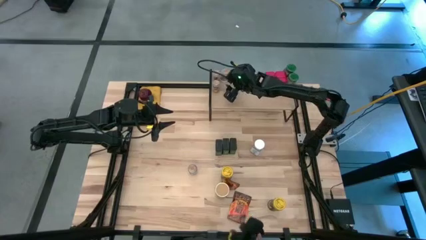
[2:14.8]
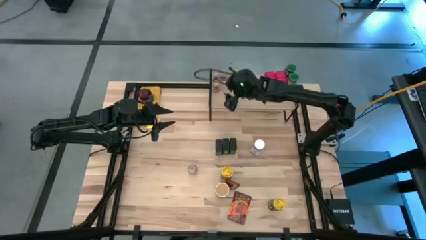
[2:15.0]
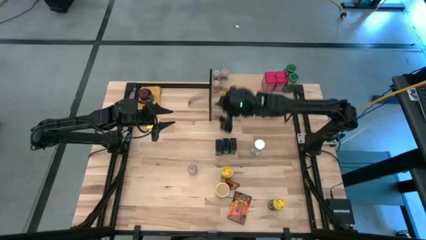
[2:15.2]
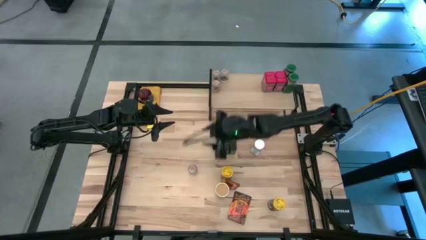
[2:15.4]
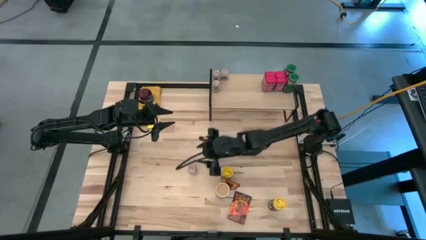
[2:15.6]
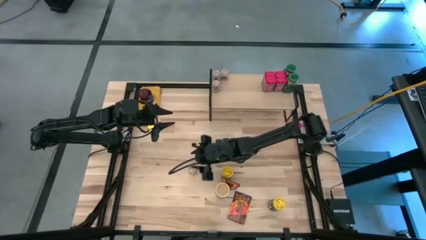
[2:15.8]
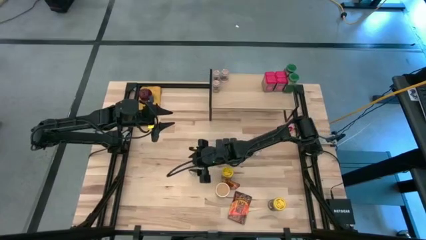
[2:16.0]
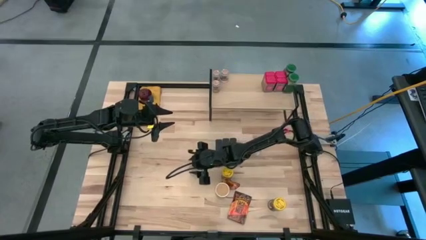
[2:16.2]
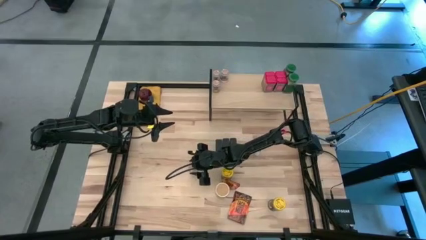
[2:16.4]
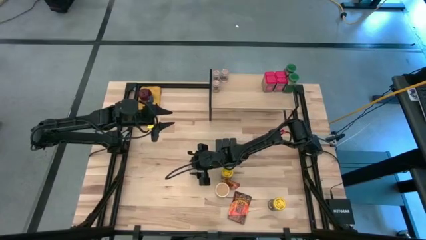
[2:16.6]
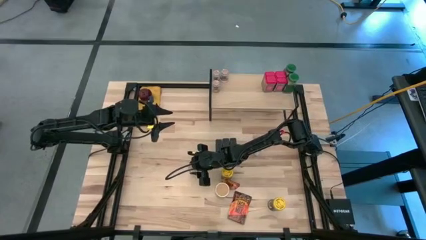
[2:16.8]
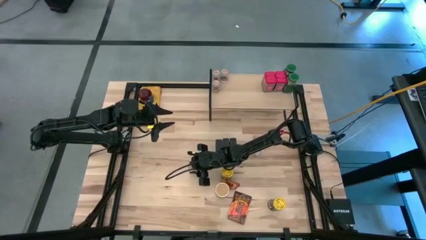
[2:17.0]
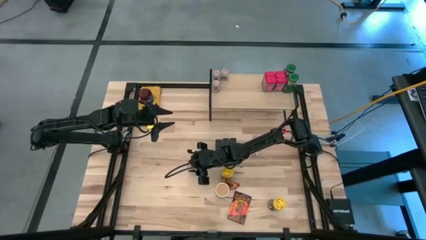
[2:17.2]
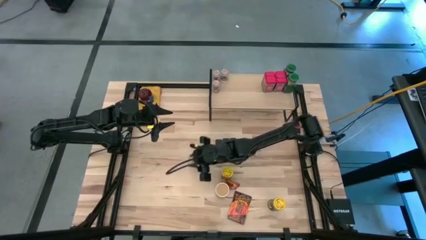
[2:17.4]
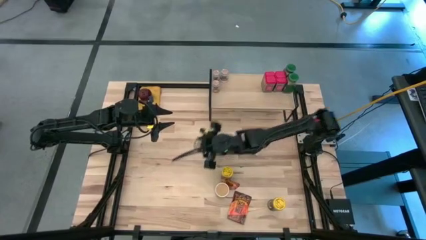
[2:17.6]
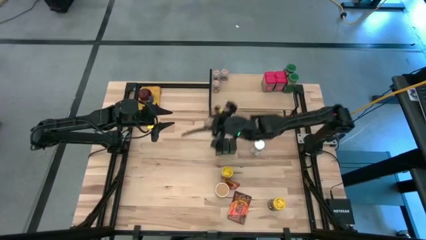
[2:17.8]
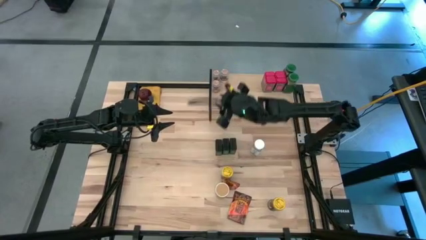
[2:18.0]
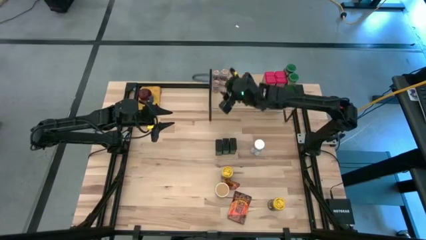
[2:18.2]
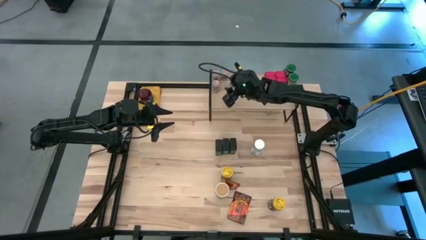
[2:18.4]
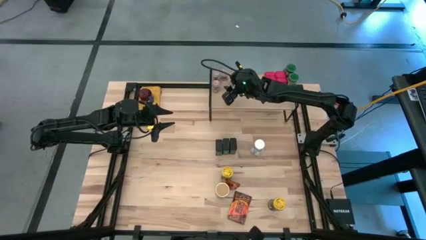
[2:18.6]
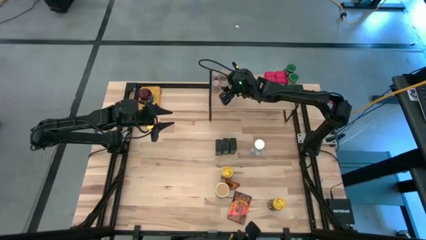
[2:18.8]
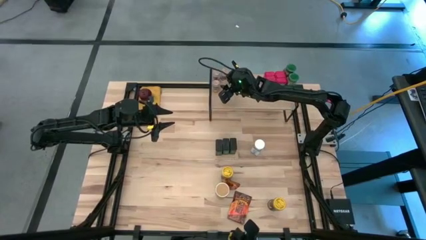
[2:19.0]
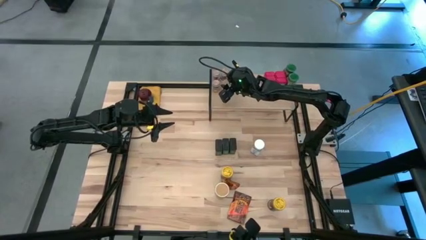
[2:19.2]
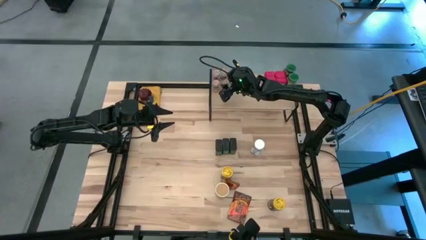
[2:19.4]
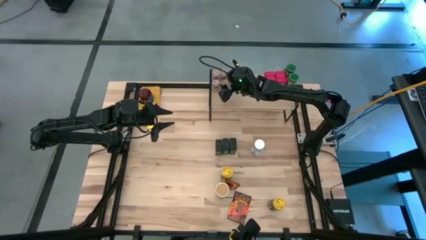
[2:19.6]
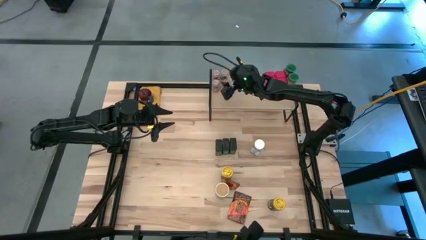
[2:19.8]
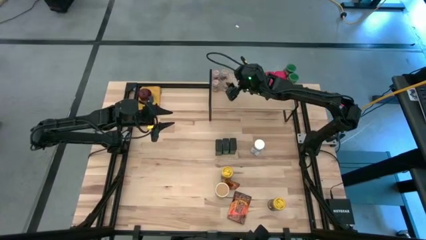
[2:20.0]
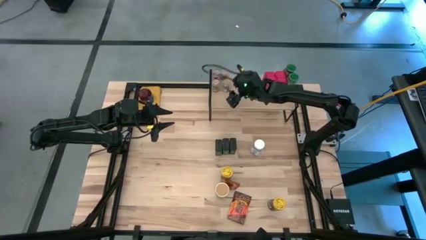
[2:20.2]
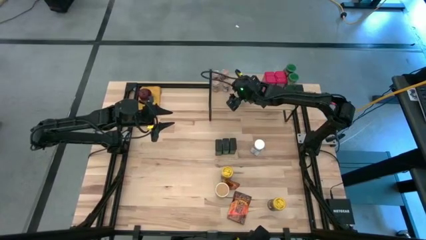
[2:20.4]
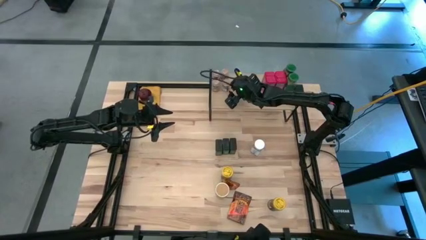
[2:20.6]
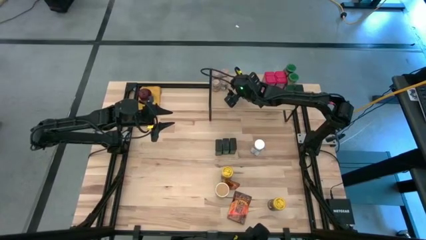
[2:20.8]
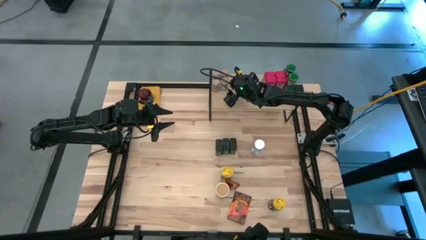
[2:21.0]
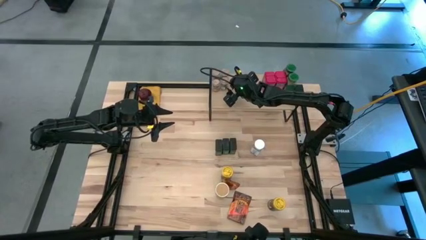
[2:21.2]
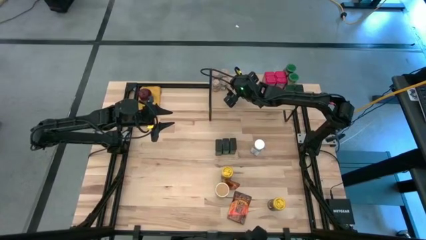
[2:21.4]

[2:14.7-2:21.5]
Task: Shelf spices
Put the brown seasoning bottle on the shelf and align it with the top right brown seasoning bottle

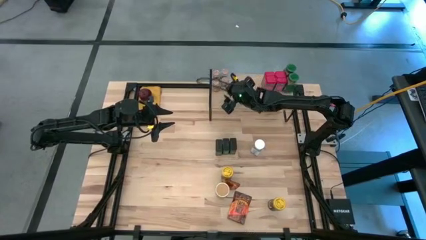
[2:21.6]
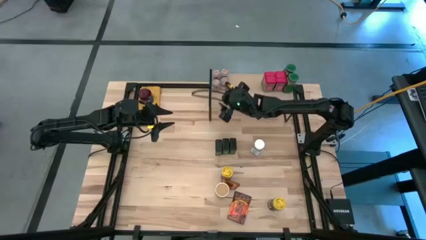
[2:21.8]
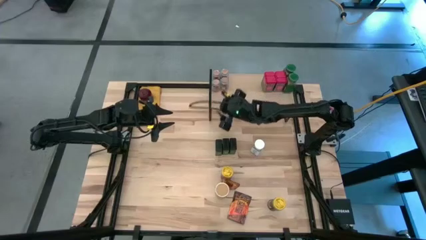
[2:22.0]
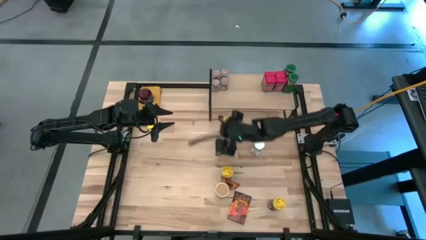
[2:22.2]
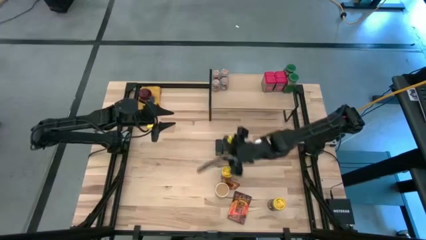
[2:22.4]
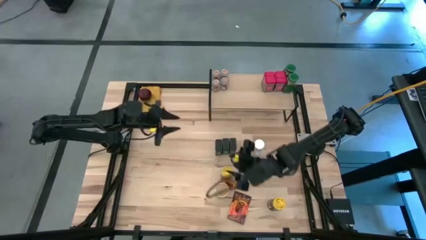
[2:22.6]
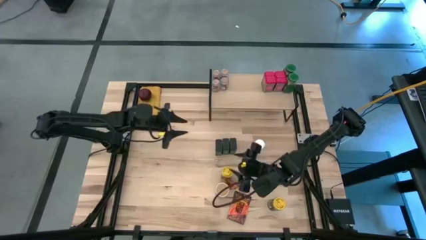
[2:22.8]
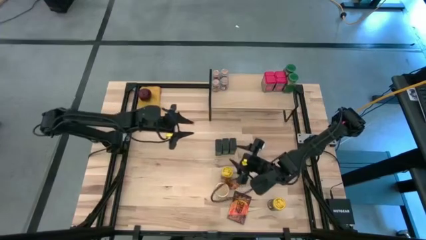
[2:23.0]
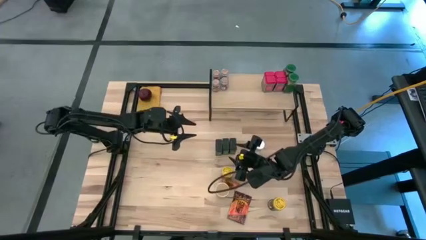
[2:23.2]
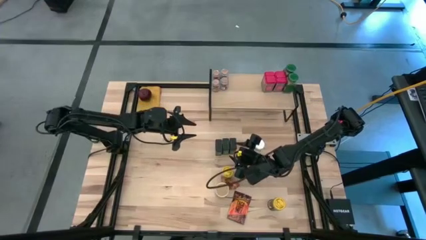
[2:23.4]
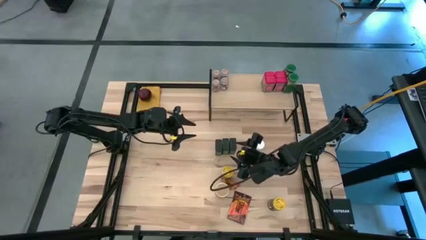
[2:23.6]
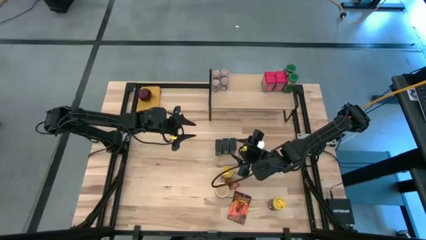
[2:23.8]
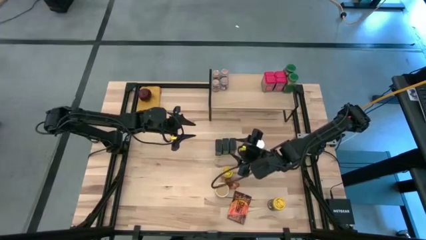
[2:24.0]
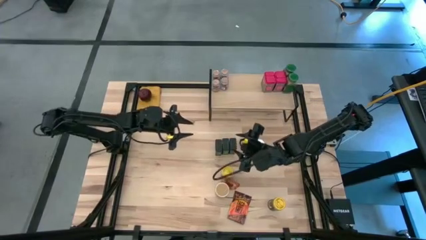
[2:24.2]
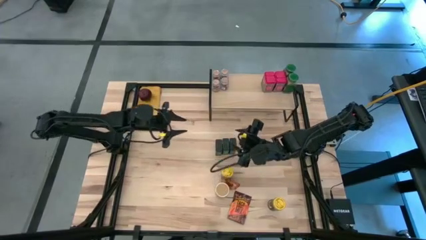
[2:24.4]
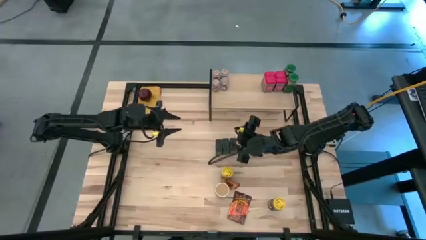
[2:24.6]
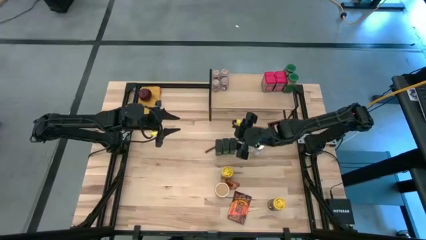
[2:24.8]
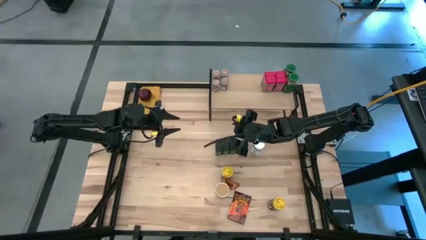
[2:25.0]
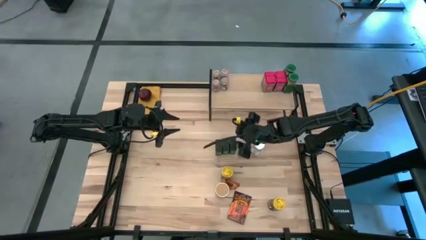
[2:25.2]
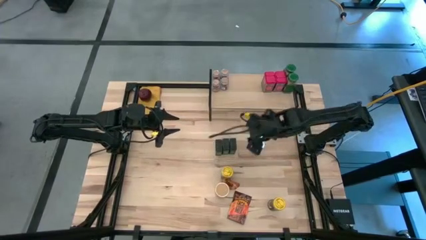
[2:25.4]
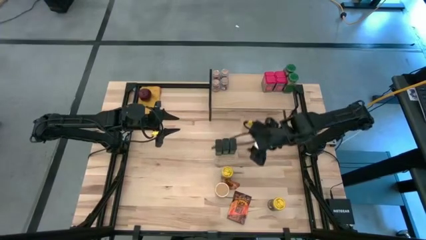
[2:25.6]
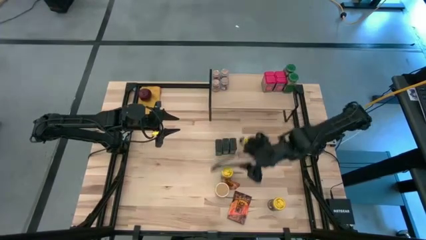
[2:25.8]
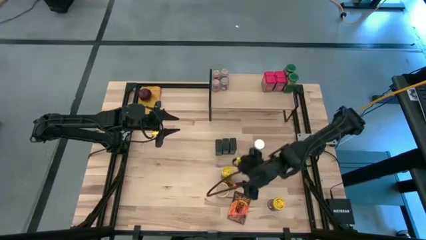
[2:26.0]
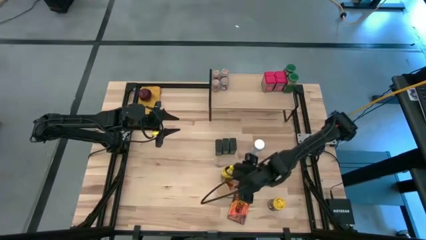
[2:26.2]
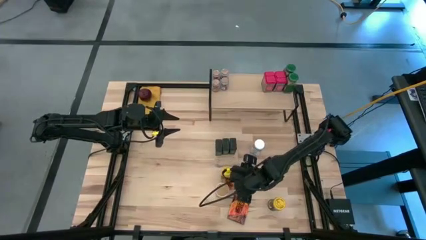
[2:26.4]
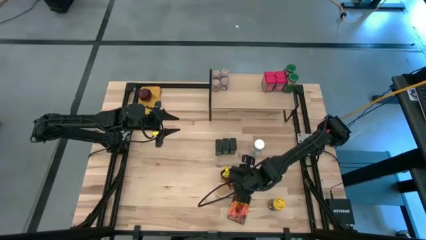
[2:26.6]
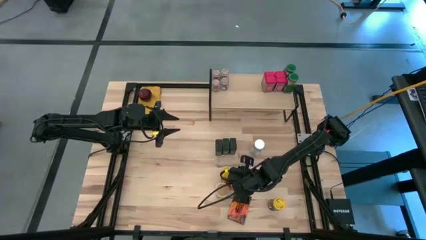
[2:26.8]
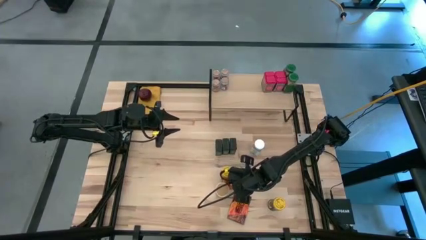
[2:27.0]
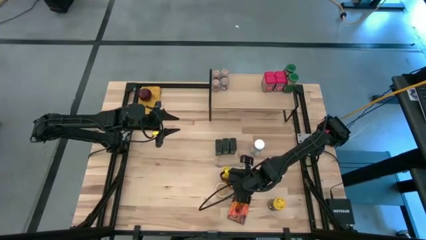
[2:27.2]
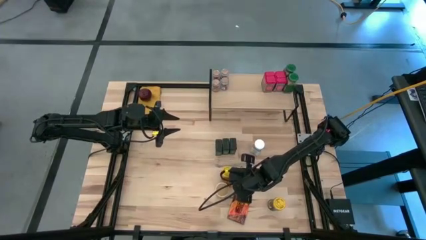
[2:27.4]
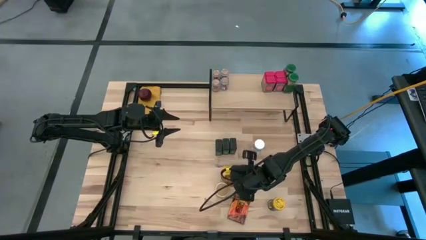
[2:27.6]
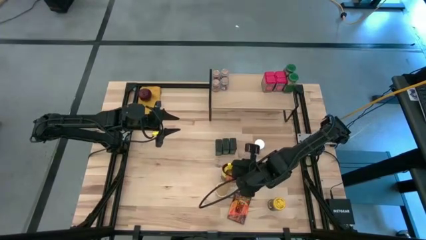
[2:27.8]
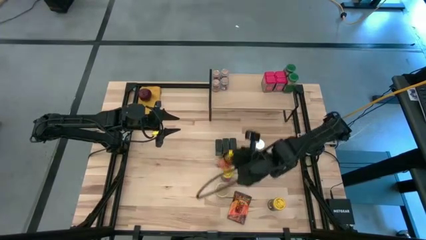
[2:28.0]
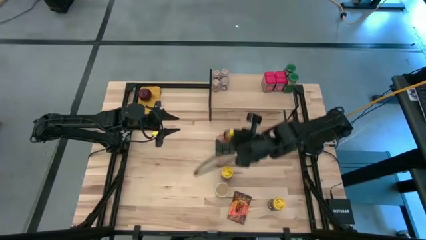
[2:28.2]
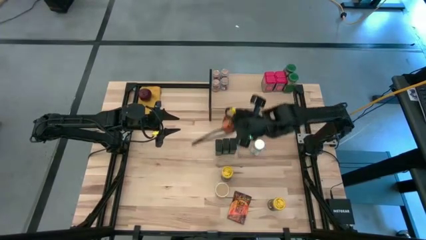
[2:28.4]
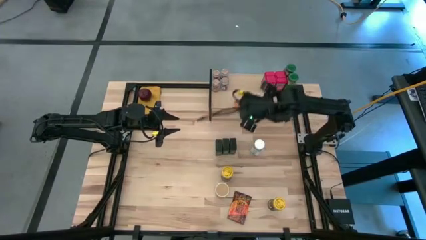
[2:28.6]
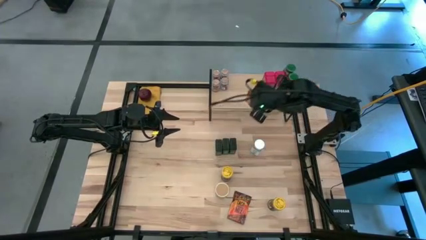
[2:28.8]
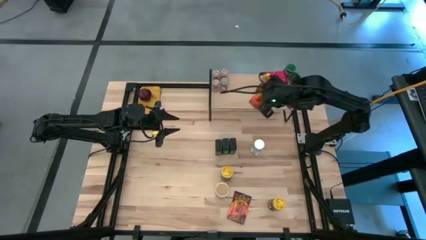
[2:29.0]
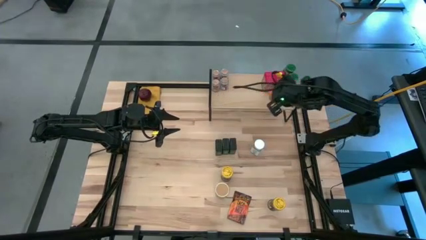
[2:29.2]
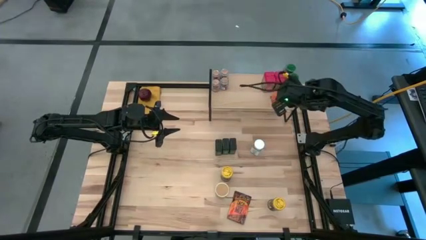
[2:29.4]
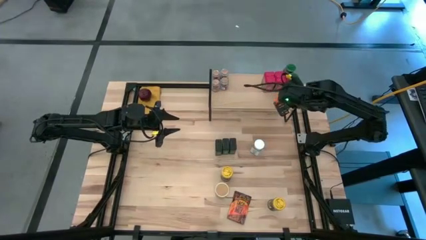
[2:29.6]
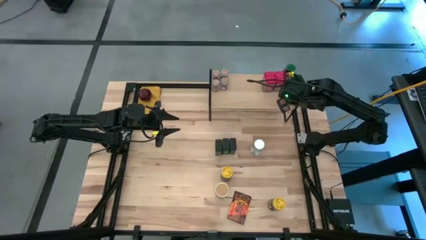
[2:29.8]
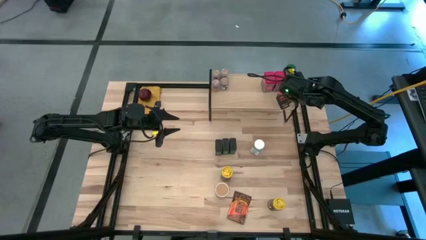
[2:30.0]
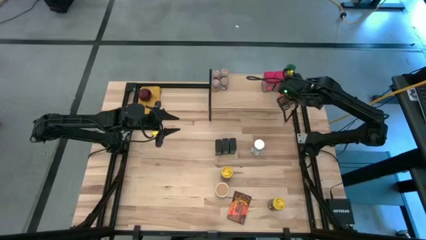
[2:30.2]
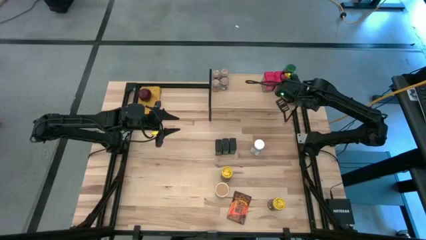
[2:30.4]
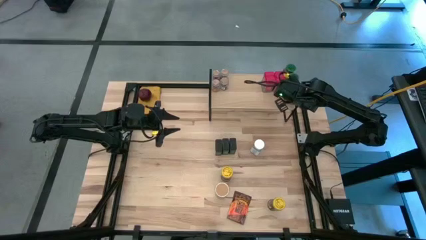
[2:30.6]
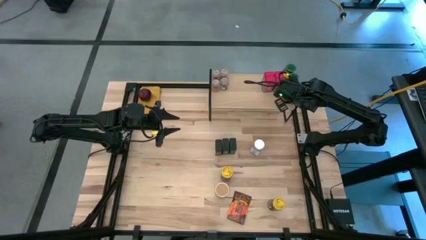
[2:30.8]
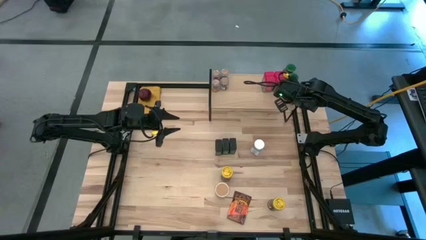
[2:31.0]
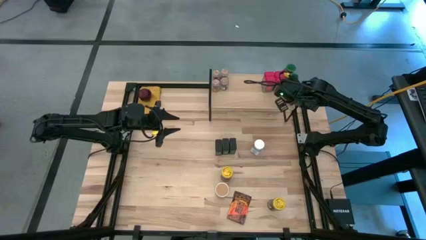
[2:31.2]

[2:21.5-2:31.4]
Put the top orange seasoning bag on the shelf
